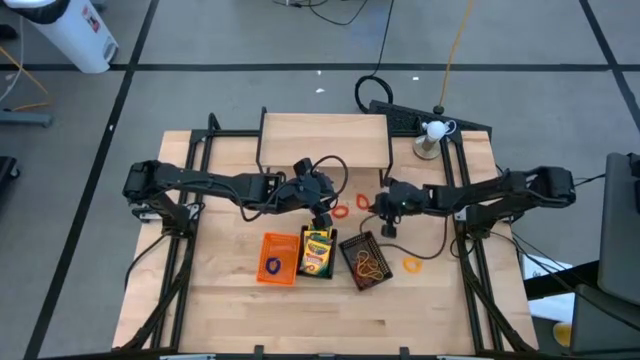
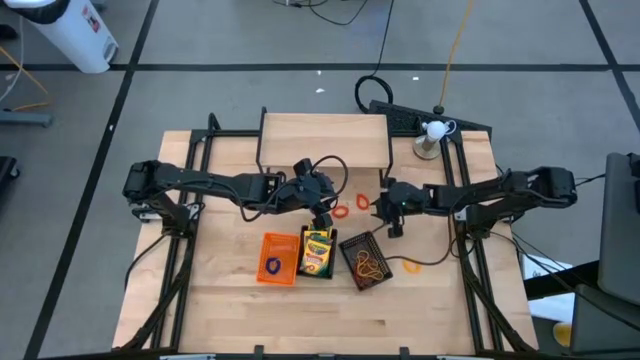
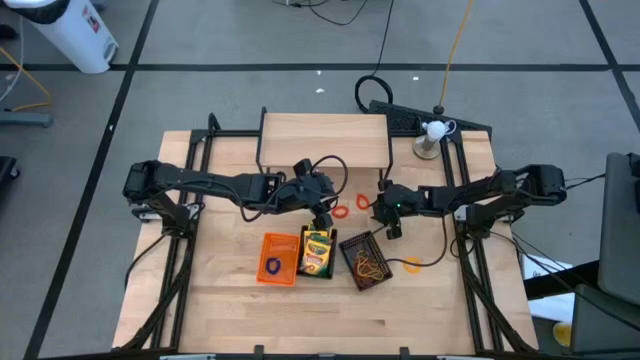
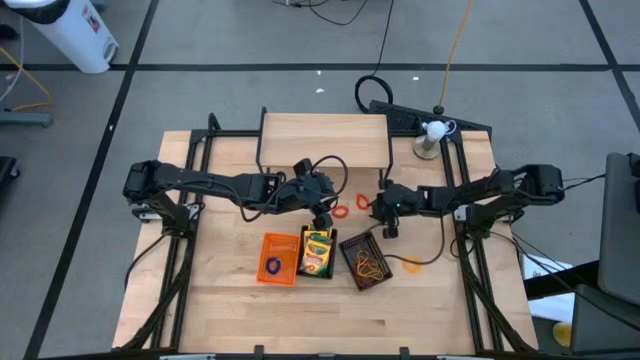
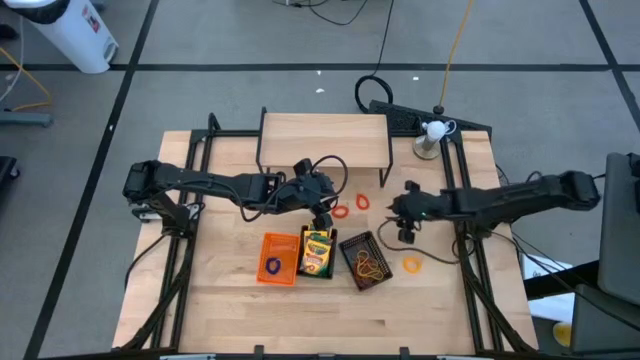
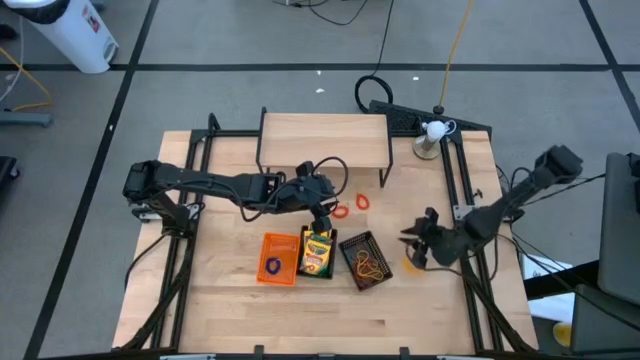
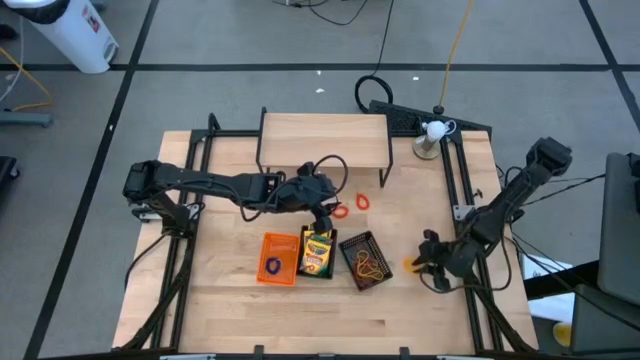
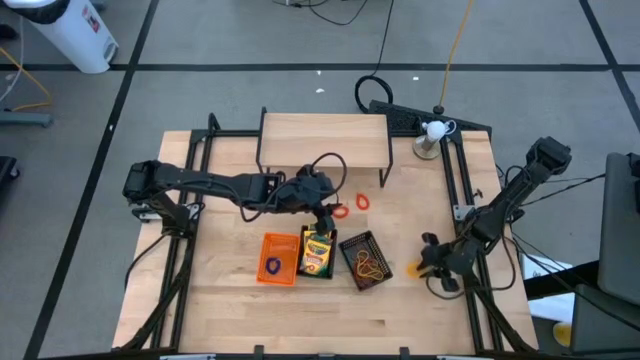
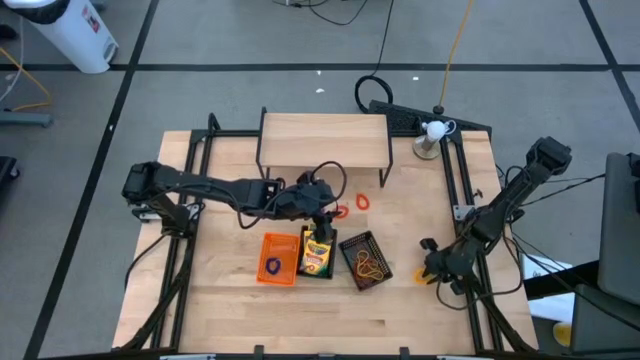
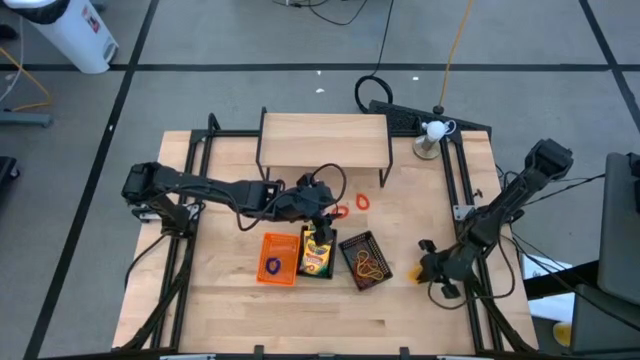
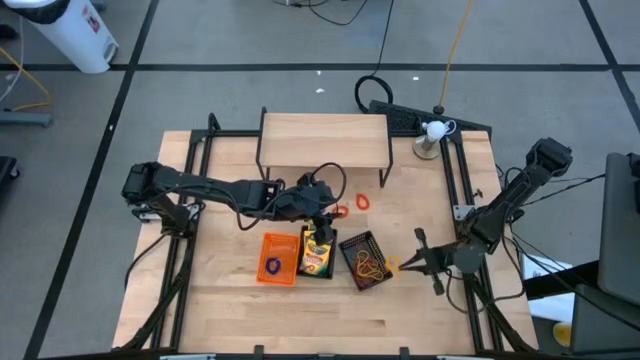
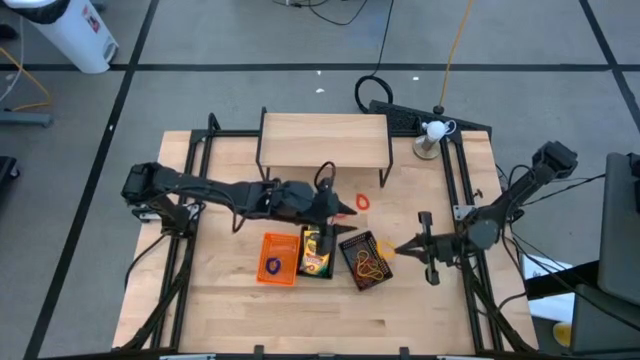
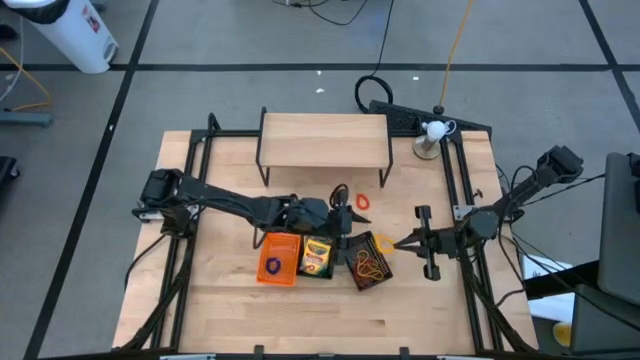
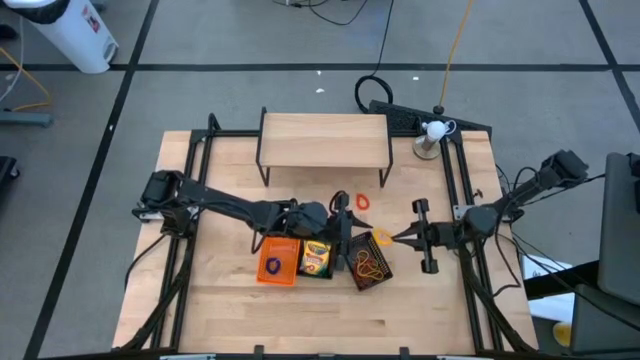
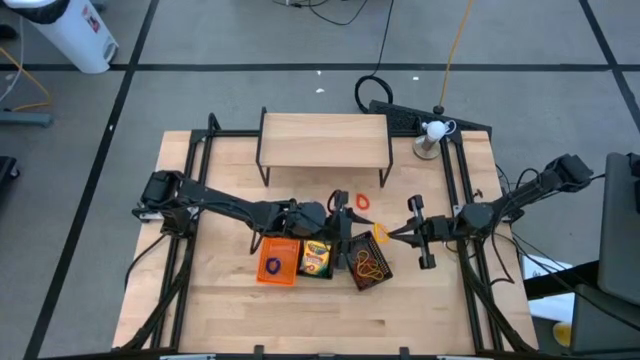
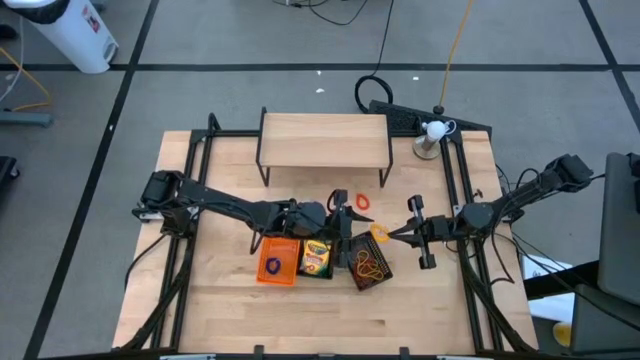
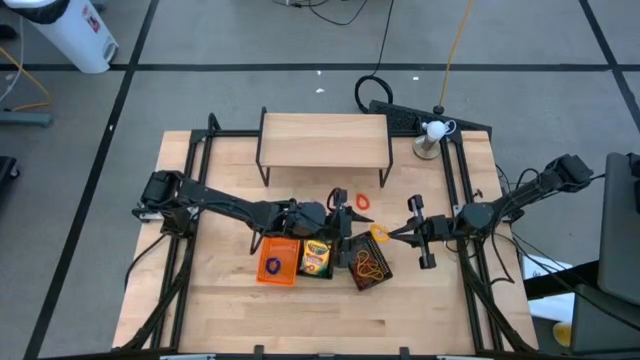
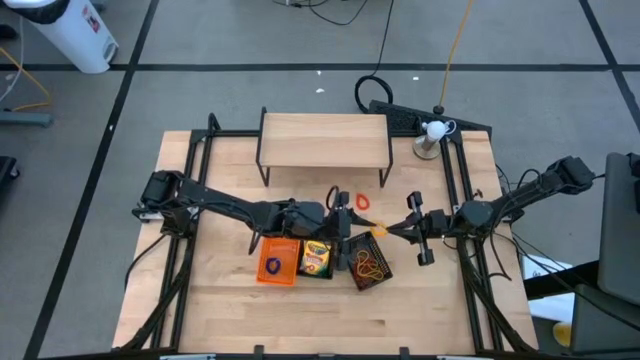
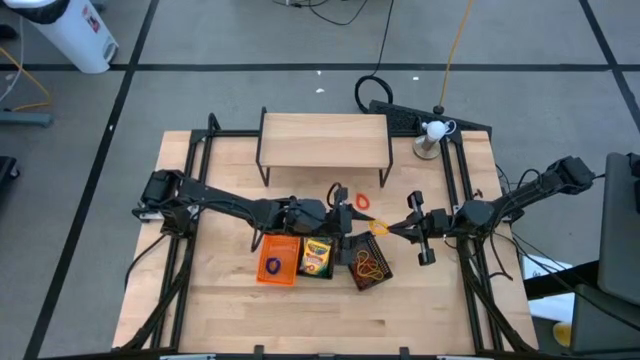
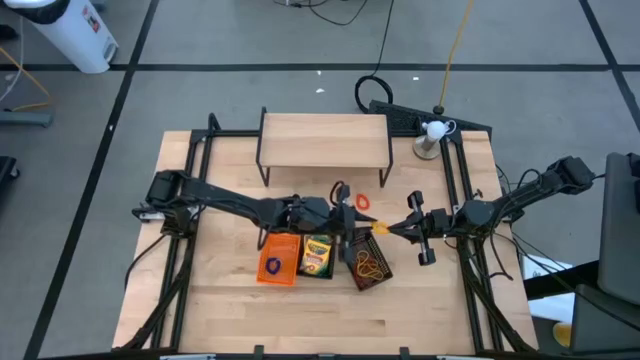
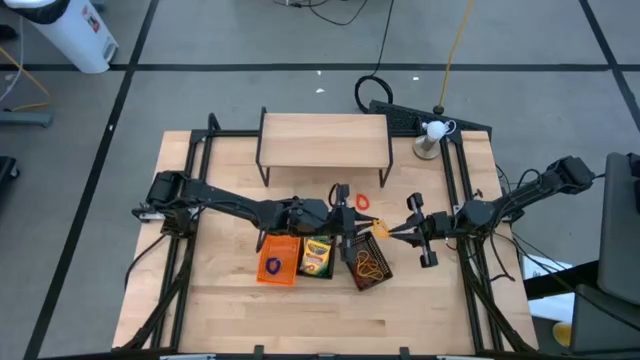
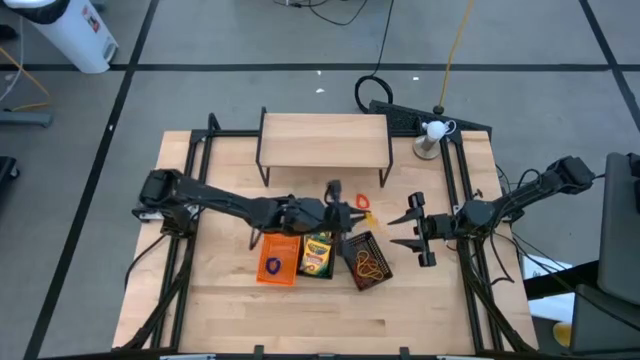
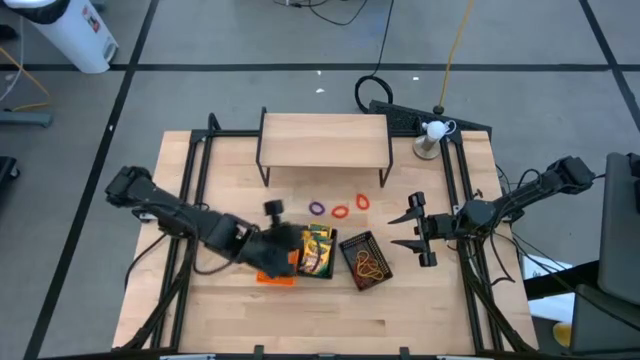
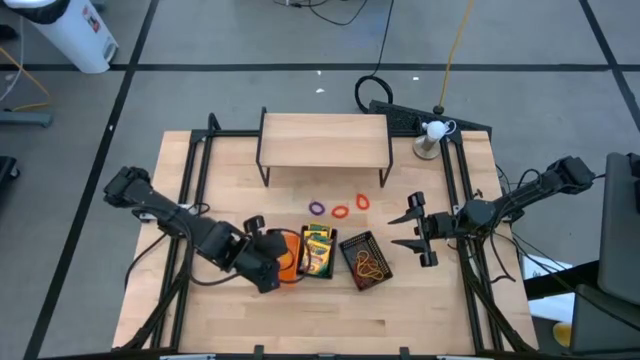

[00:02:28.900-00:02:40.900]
Task: Pick & Place Office Desk Supplies
Put the yellow keychain into the orange bin

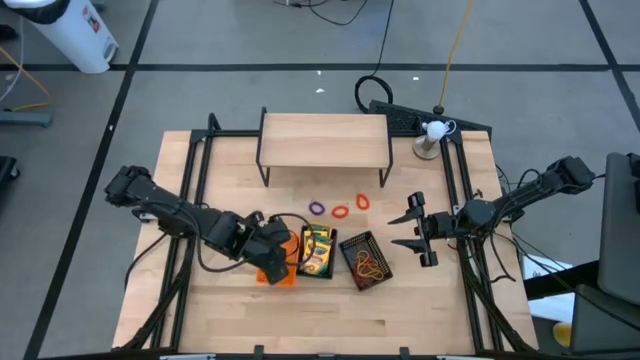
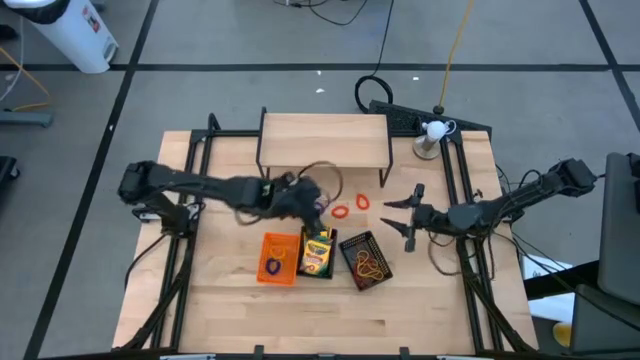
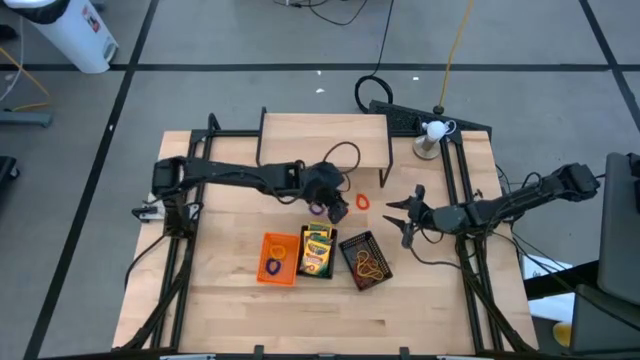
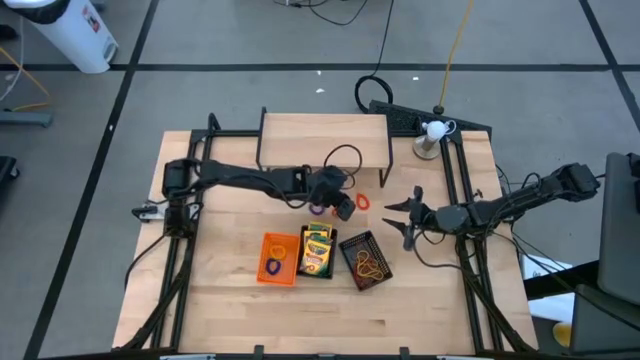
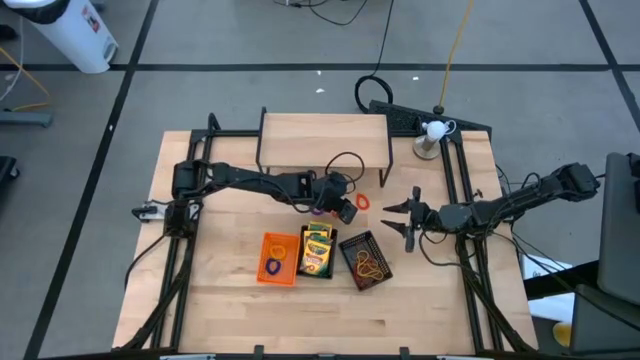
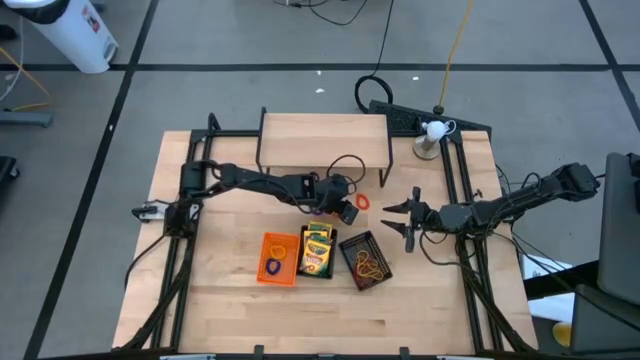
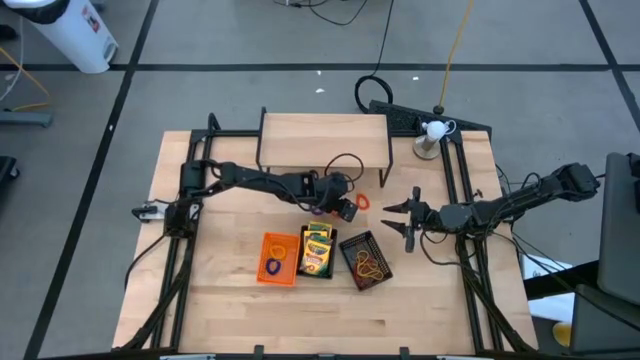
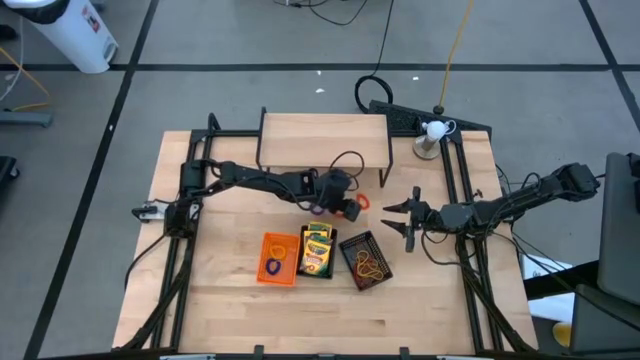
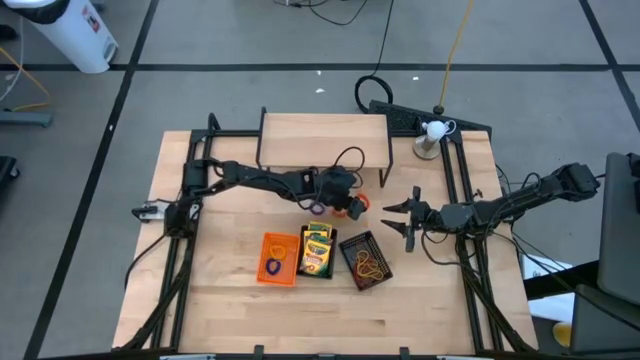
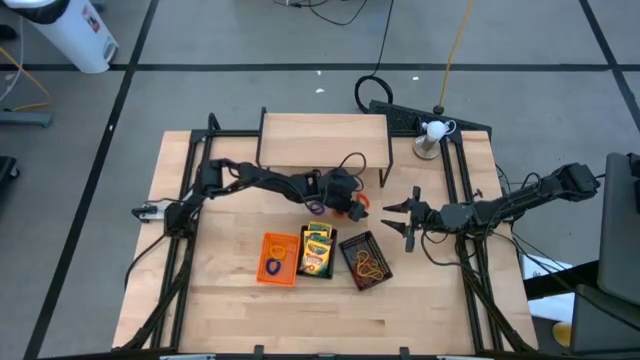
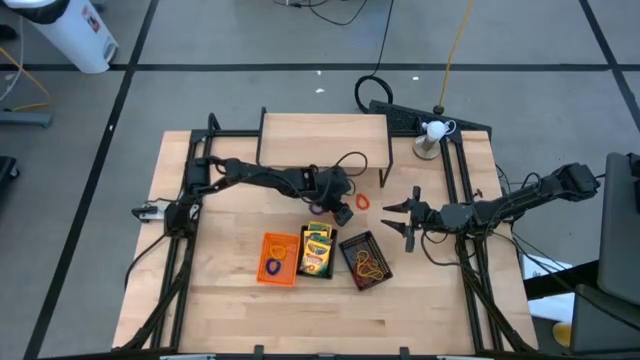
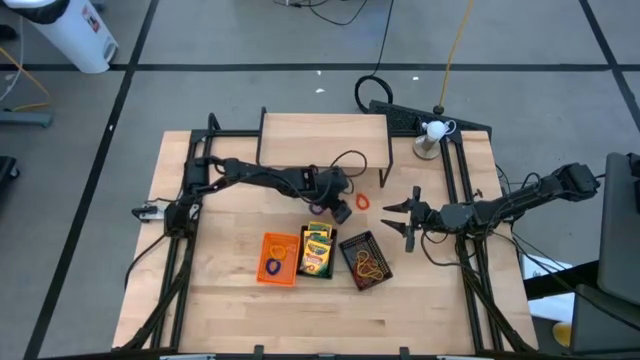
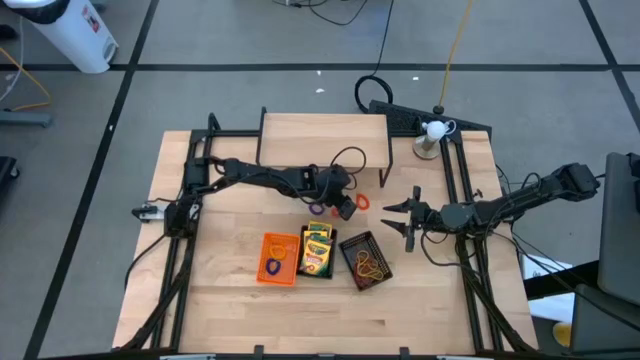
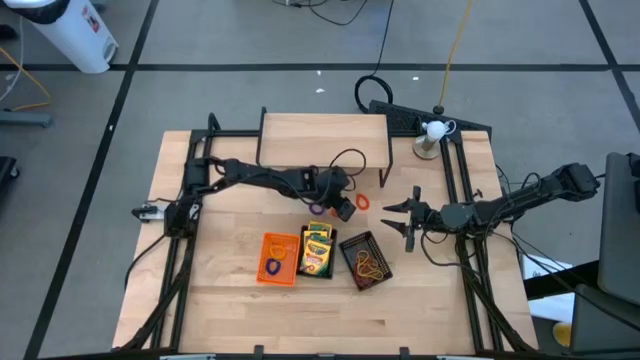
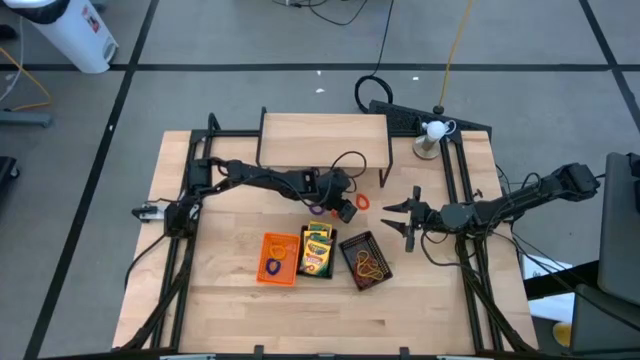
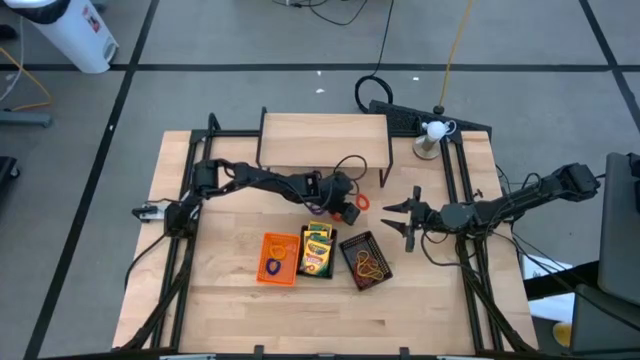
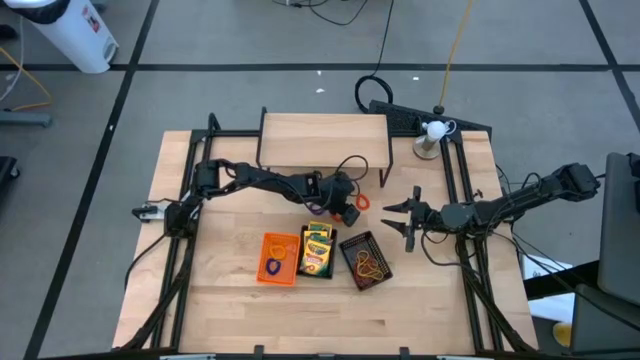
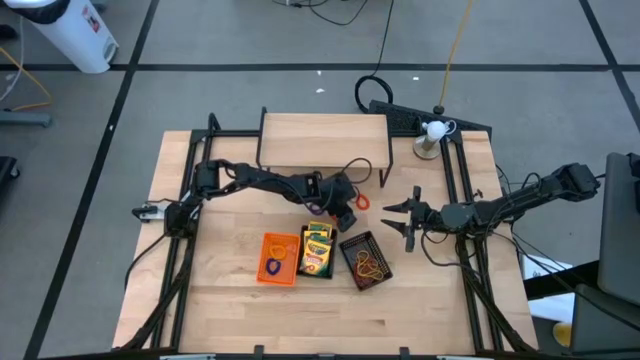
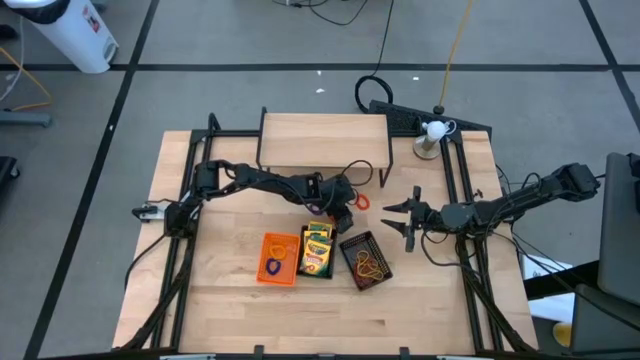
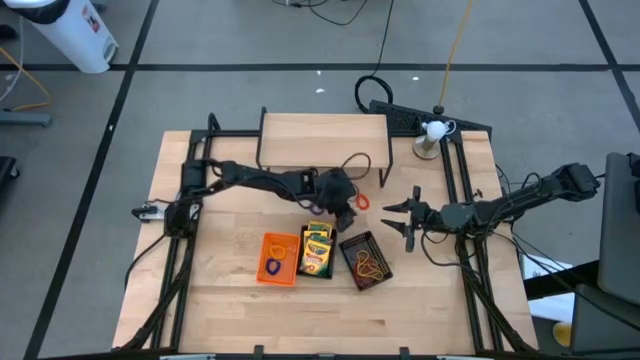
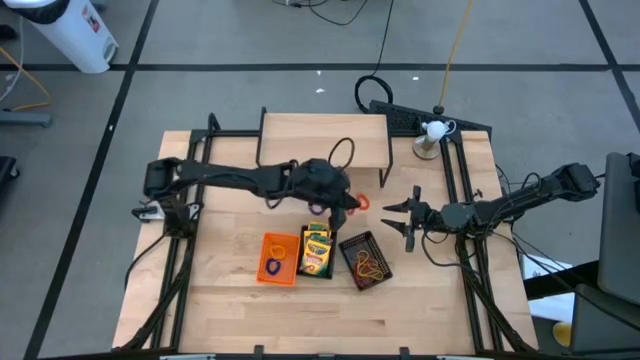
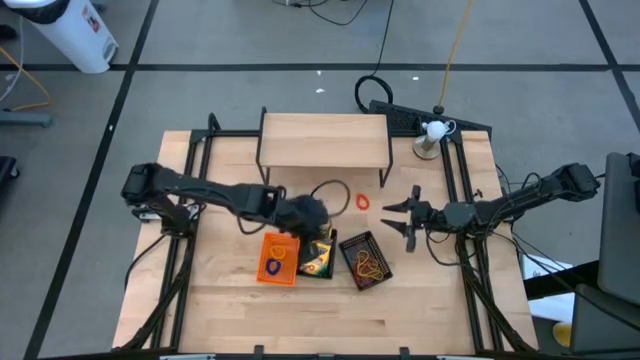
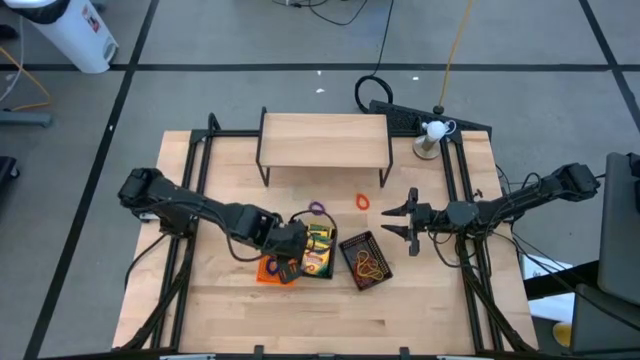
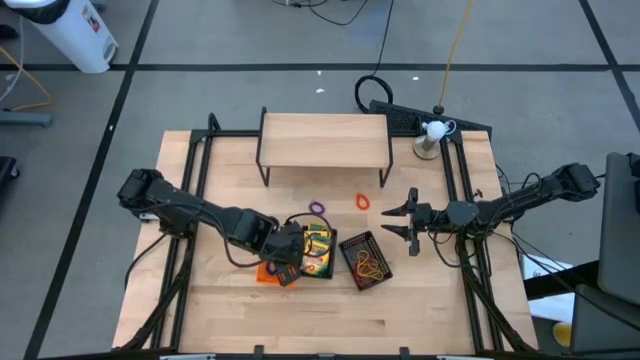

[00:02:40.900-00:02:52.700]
Put the orange keychain into the orange bin
